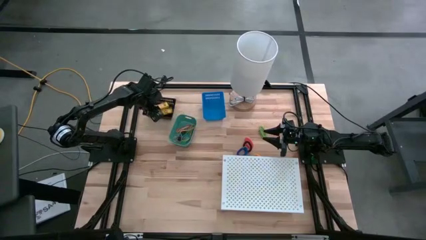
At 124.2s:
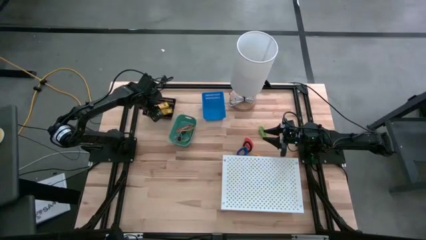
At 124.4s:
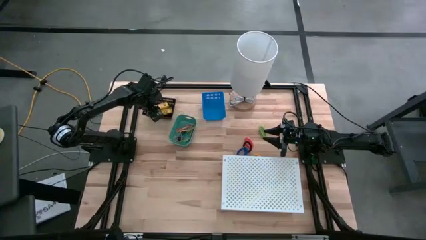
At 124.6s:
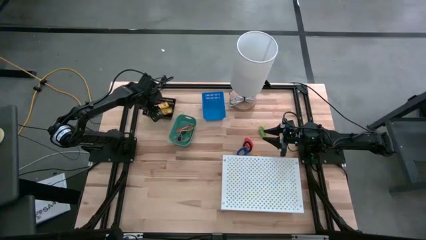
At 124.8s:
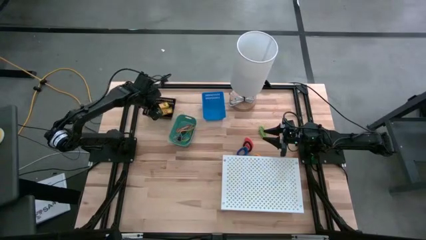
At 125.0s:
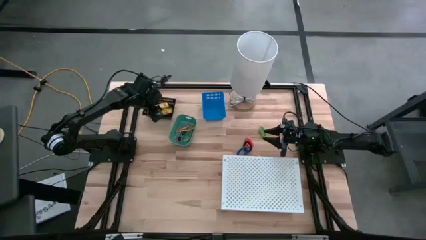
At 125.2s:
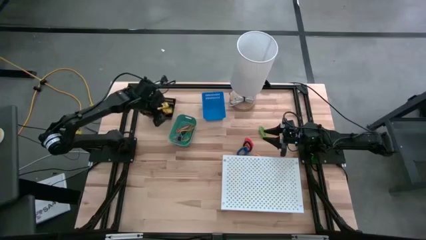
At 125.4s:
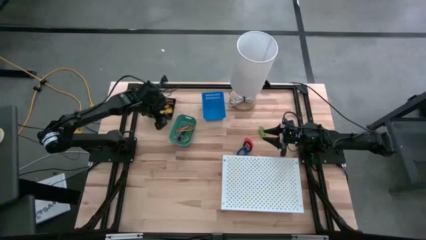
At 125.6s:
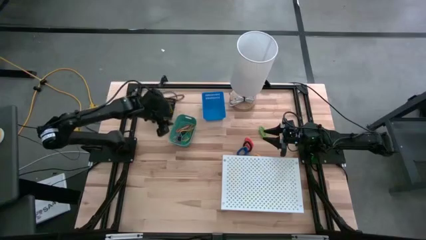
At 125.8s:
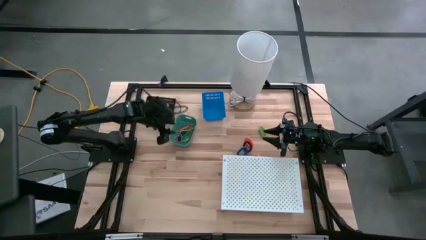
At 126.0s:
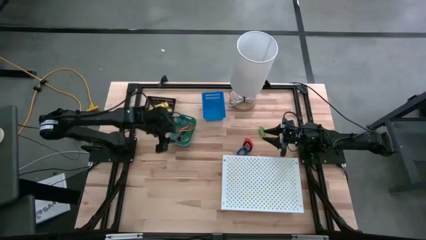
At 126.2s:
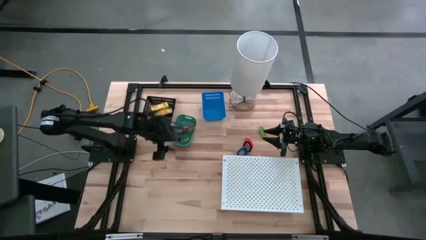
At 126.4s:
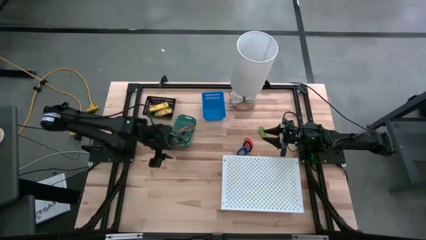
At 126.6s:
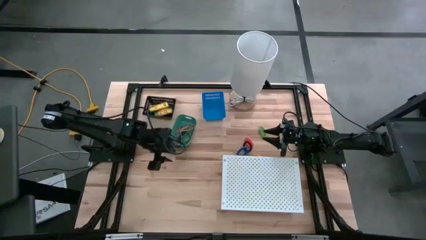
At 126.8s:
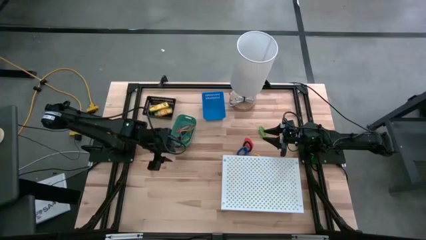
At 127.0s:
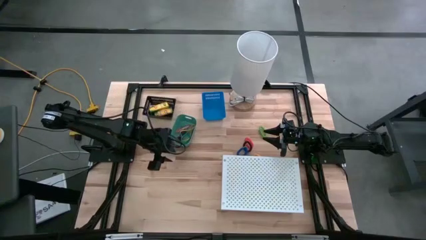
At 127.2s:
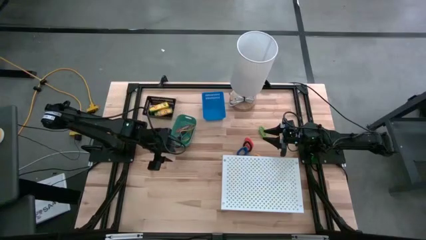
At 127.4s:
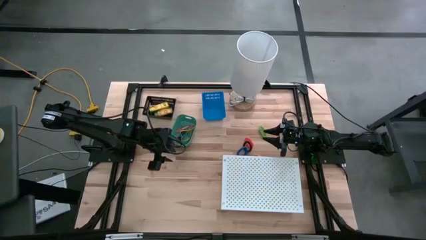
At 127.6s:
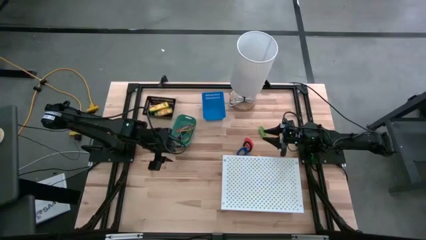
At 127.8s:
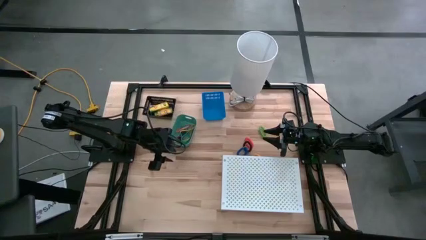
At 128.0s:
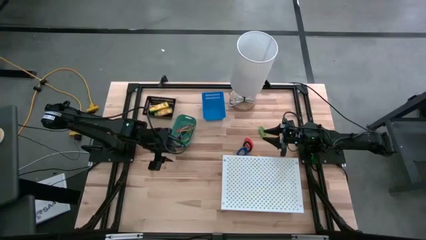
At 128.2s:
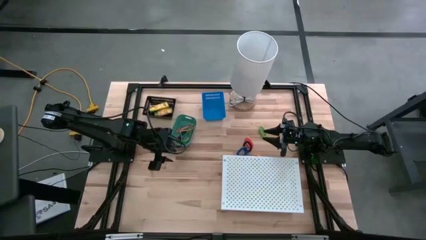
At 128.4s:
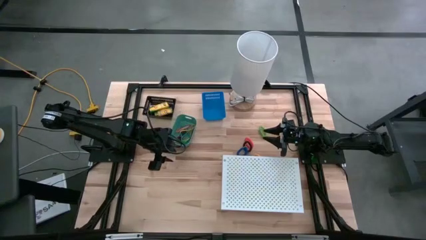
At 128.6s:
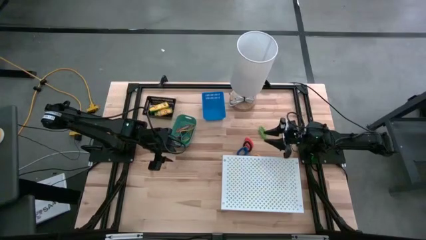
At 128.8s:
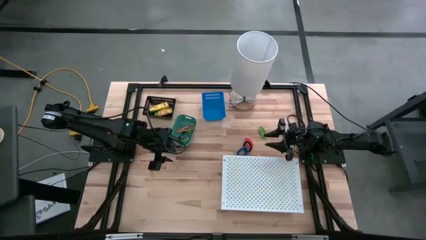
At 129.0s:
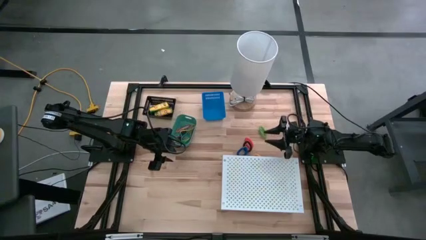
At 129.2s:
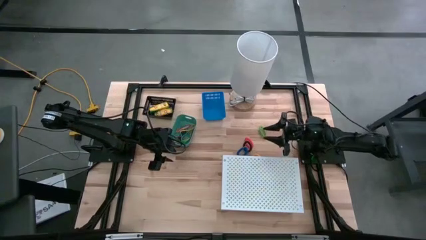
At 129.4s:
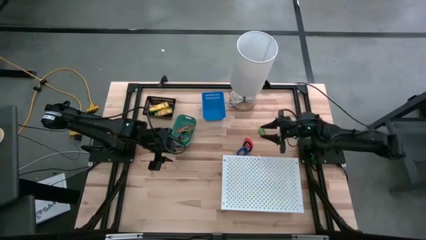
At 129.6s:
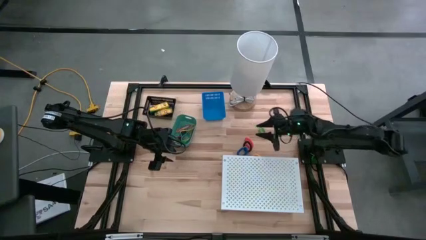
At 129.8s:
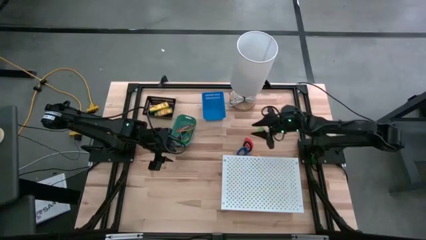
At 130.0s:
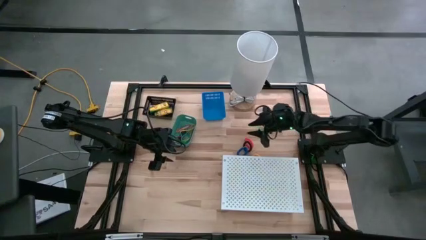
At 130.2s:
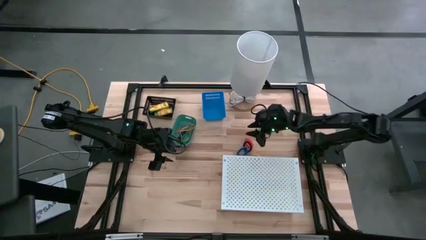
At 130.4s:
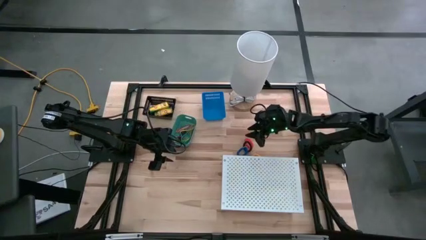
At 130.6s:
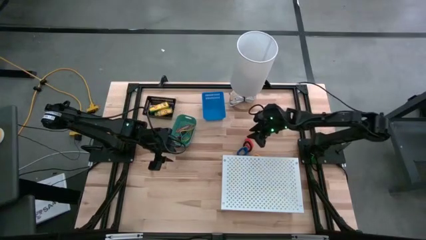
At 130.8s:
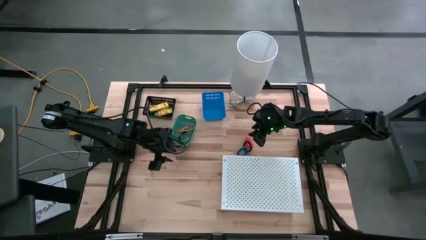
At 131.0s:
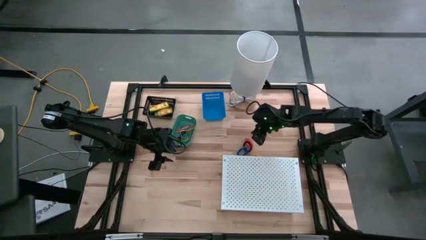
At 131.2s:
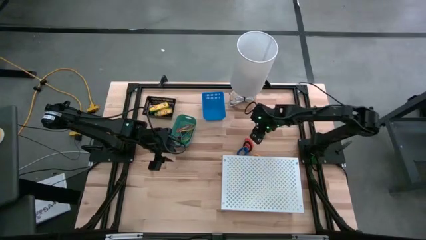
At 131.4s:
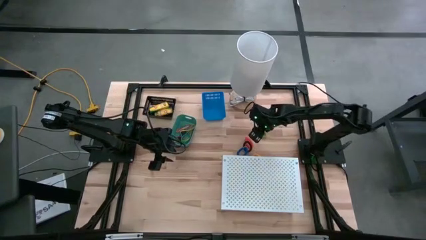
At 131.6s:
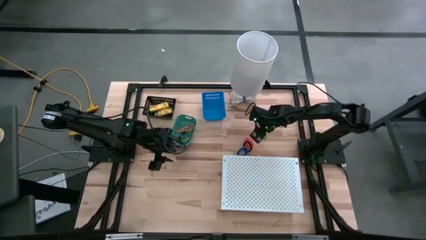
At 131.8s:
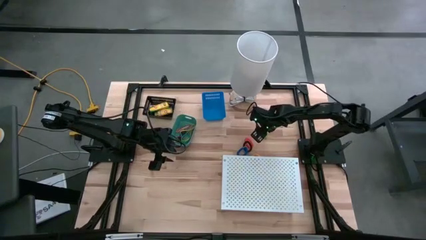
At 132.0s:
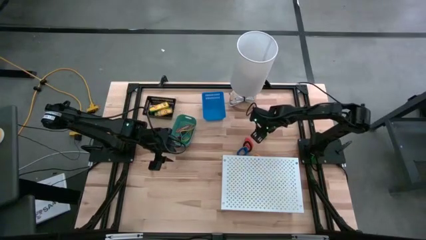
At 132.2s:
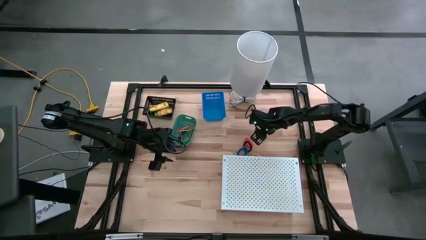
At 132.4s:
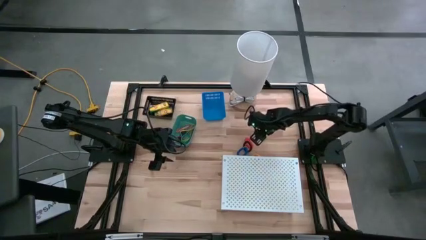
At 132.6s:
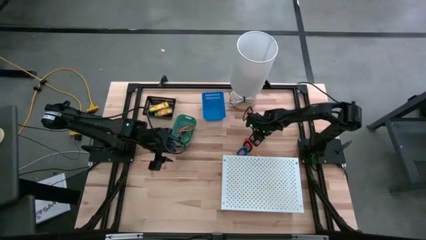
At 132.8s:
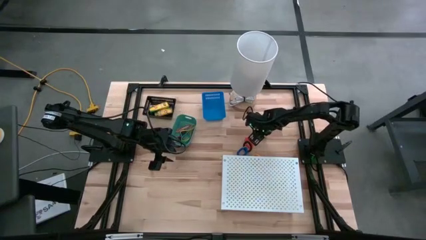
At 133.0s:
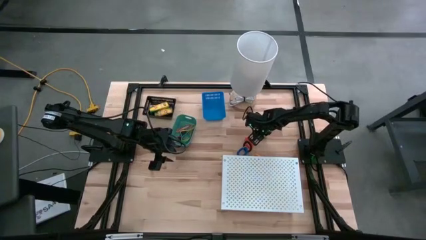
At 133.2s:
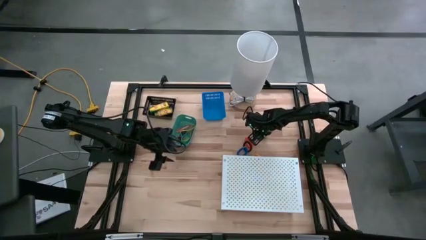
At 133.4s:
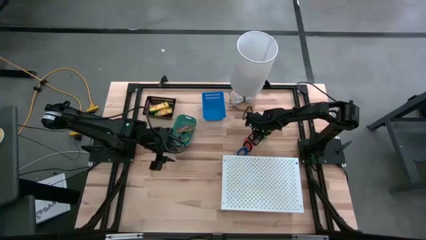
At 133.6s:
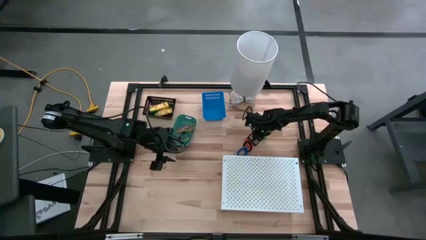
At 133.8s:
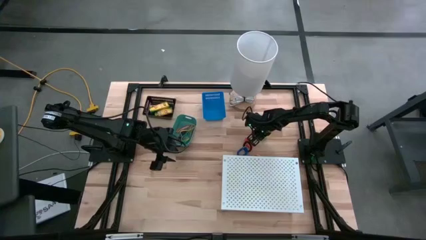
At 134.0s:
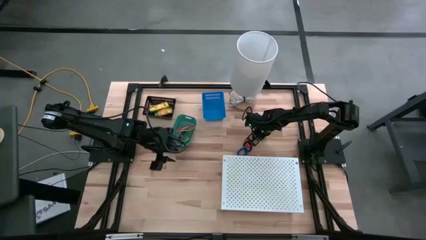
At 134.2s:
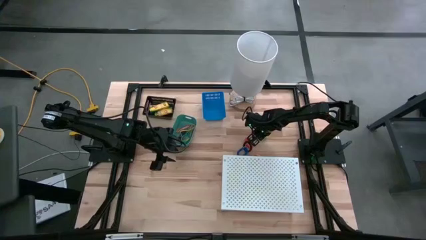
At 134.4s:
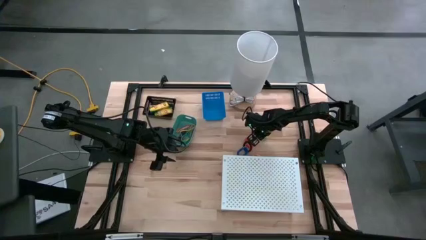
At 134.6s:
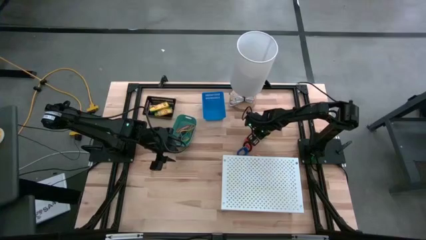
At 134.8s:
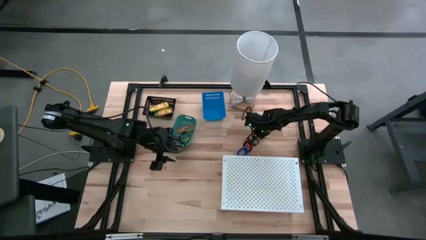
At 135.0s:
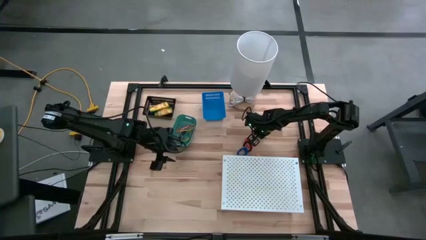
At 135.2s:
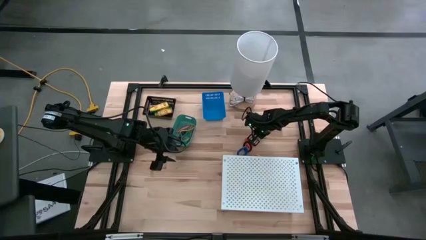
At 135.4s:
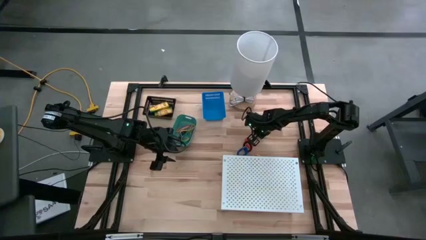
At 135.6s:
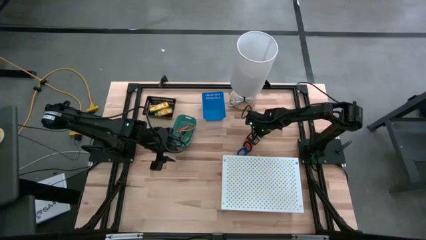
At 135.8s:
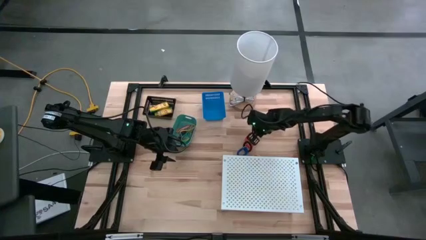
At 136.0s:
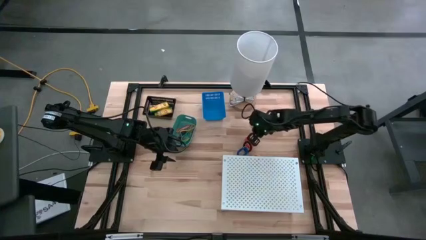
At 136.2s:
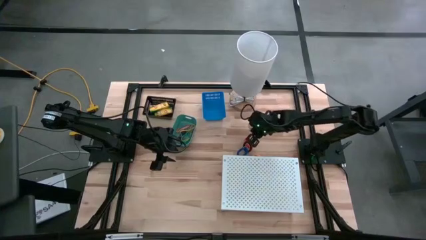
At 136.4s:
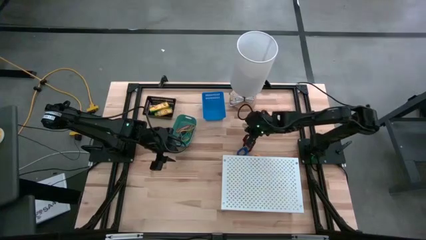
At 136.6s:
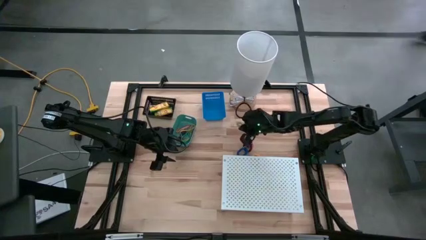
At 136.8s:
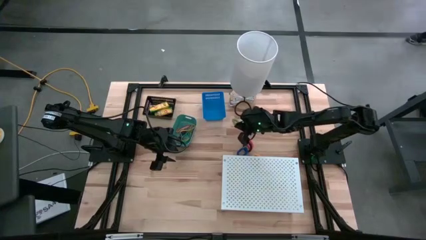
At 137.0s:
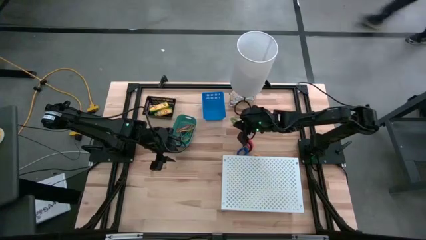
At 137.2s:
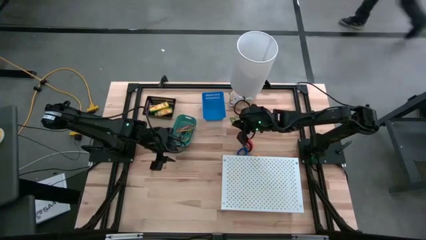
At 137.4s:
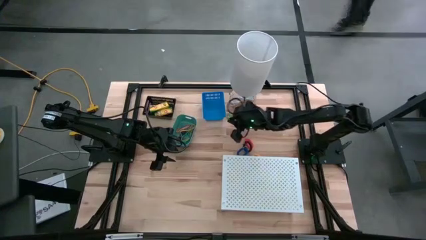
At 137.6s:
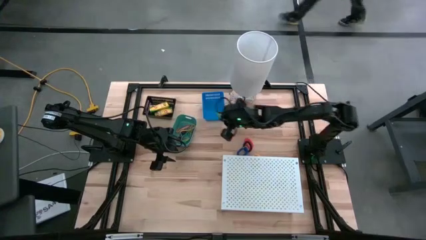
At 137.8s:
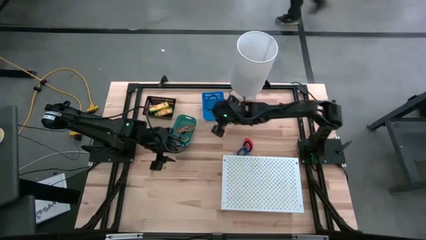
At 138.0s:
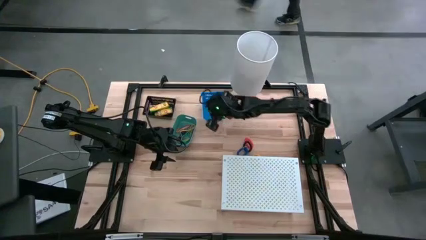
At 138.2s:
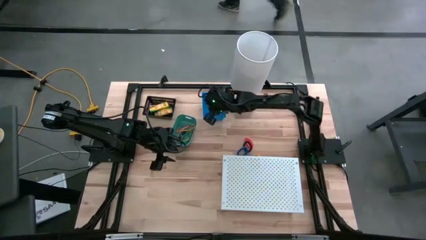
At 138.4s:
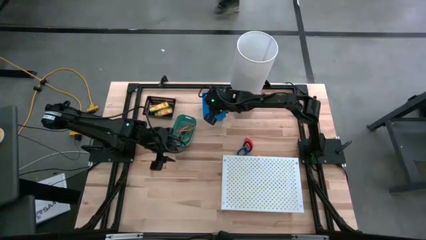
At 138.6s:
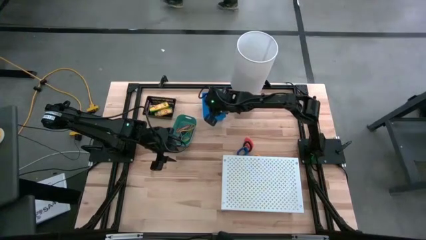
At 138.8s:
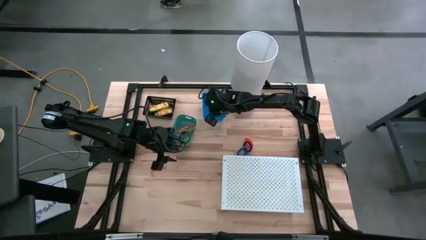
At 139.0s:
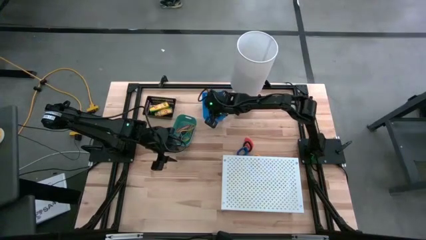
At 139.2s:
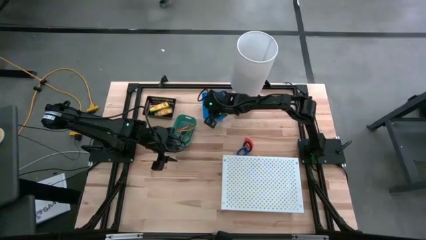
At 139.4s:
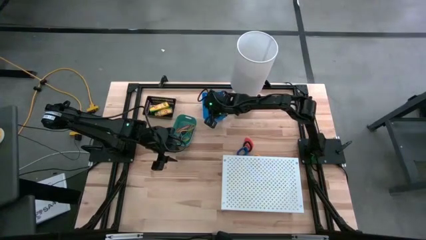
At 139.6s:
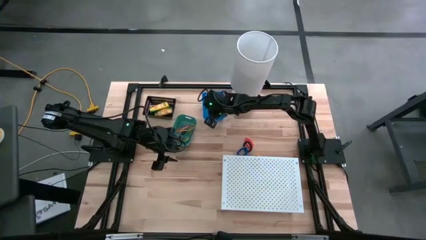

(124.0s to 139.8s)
Task: Pick & Place Office Desk Supplies
Put the green spring keychain into the blue bin

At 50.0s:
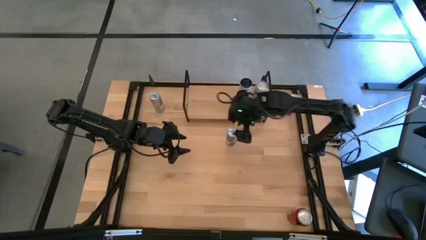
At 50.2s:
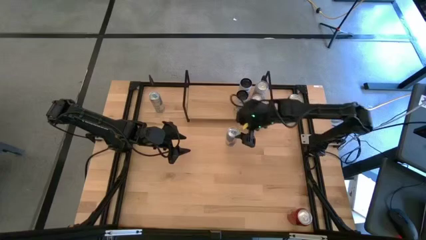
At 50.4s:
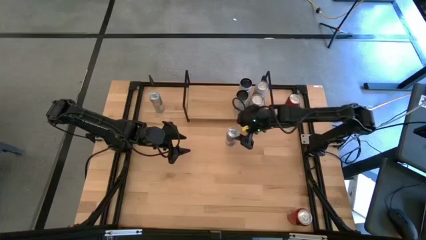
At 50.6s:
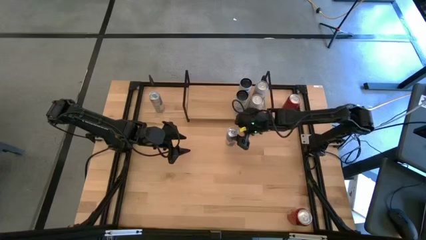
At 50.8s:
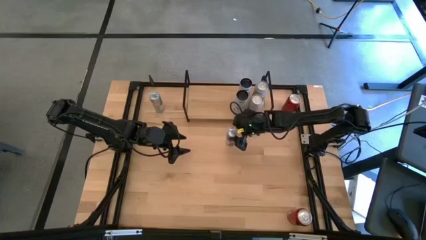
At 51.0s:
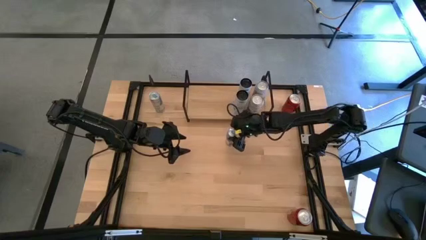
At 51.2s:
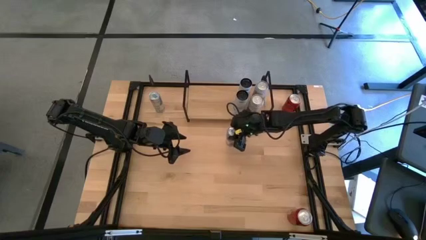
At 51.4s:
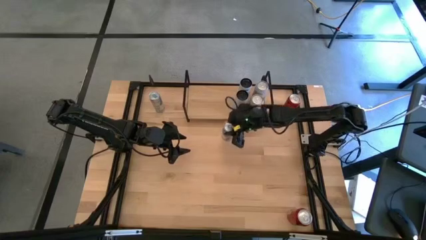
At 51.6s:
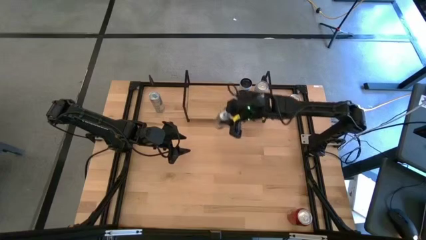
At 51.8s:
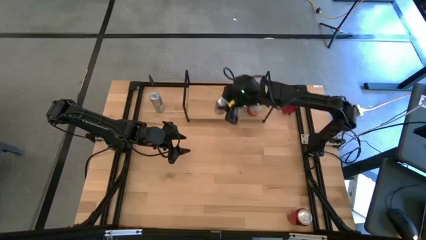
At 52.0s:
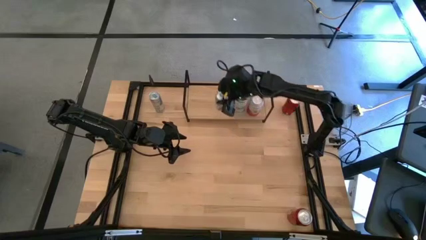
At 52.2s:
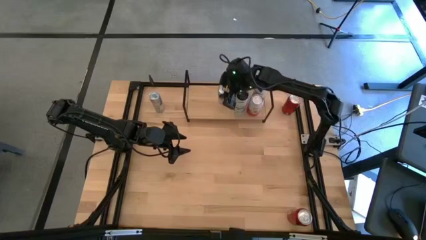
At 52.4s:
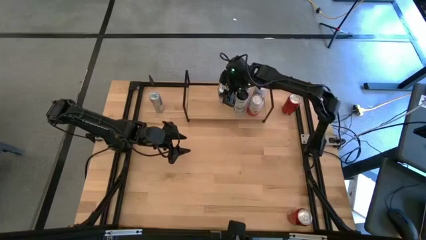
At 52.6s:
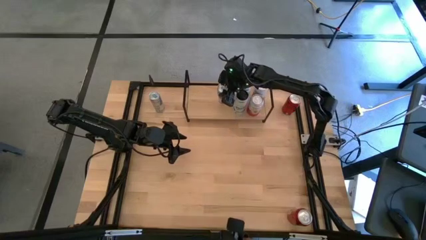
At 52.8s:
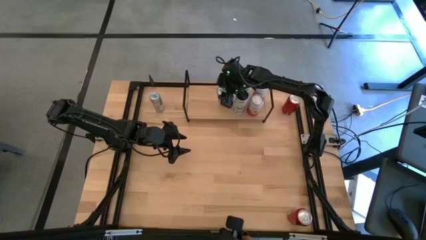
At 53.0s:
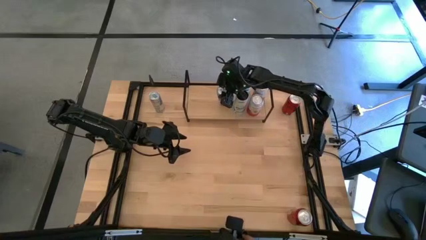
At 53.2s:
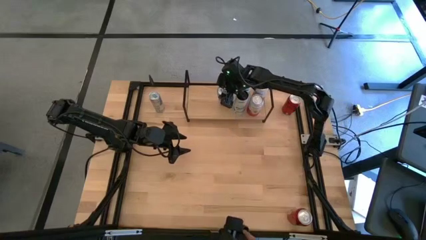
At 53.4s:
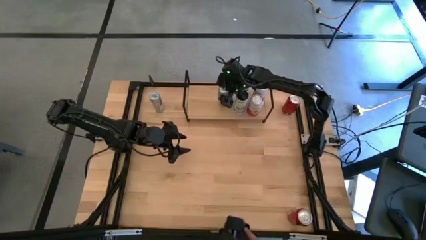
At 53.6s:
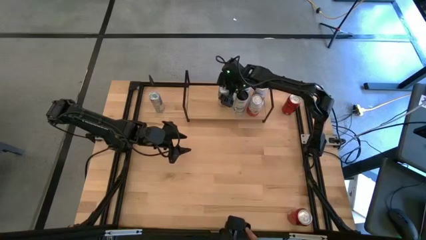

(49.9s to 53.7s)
Task: Place canned beverage on shelf
Put the center blue soda can on the shelf
